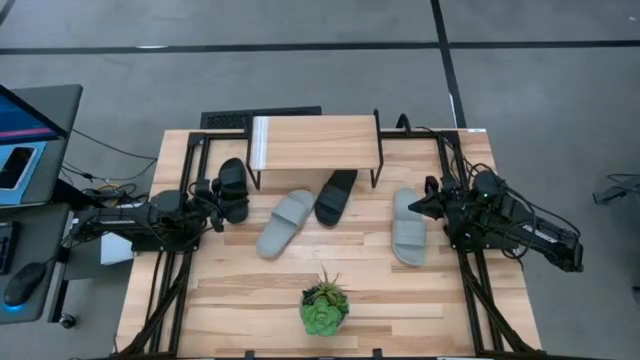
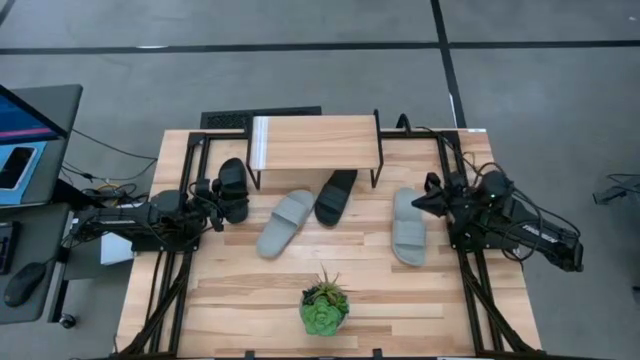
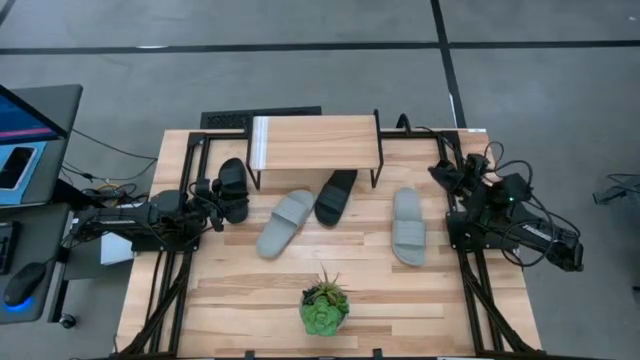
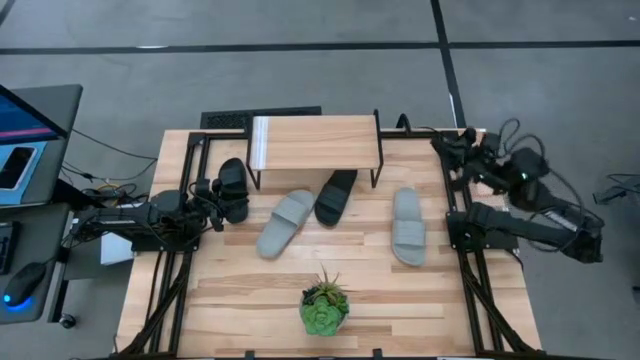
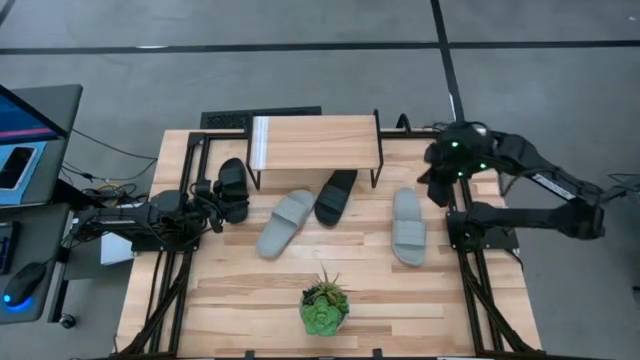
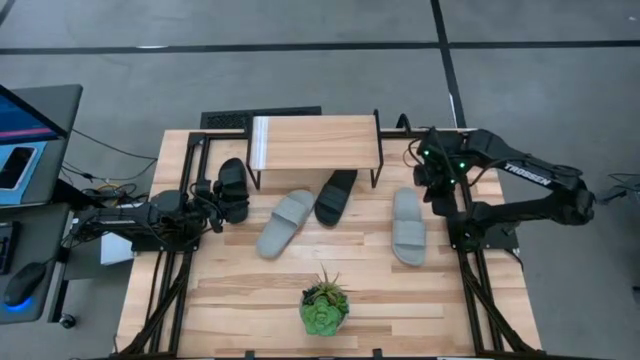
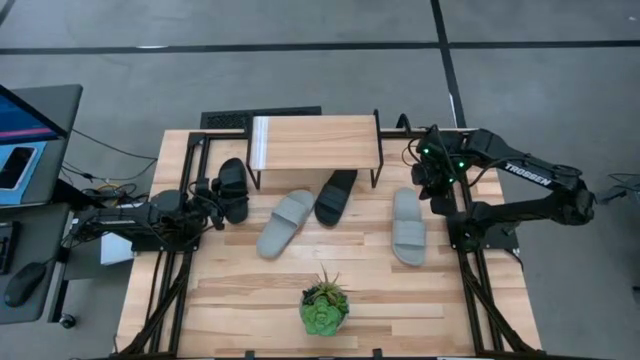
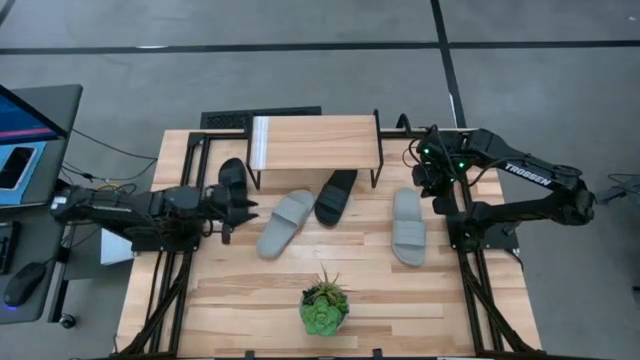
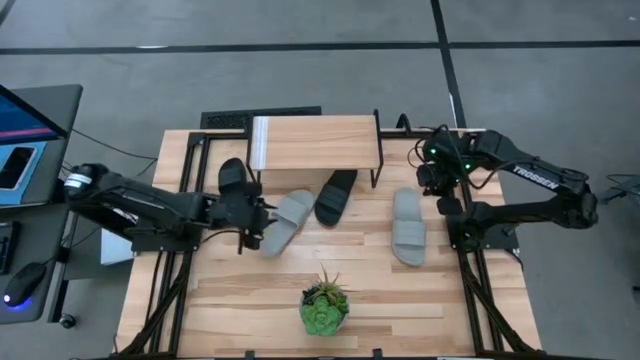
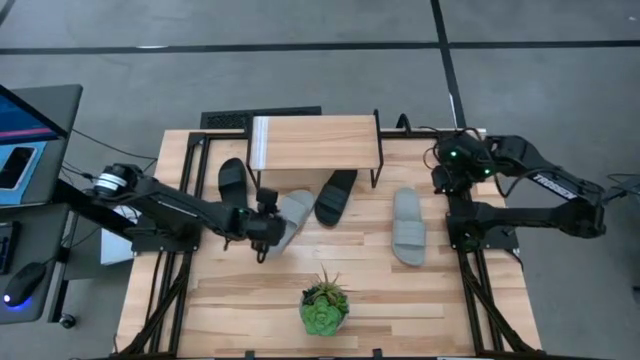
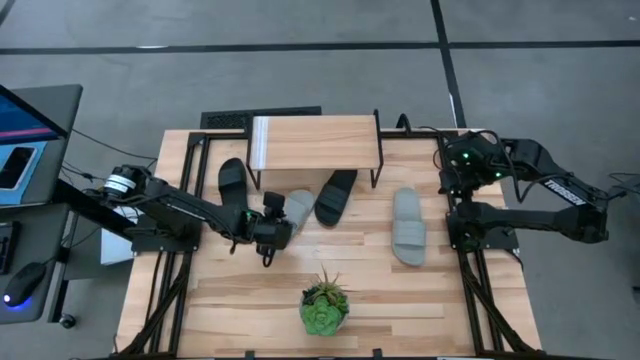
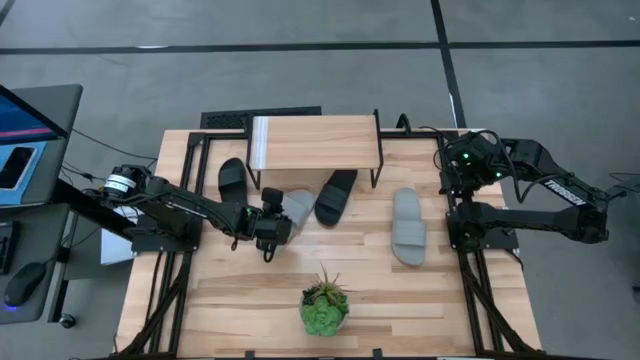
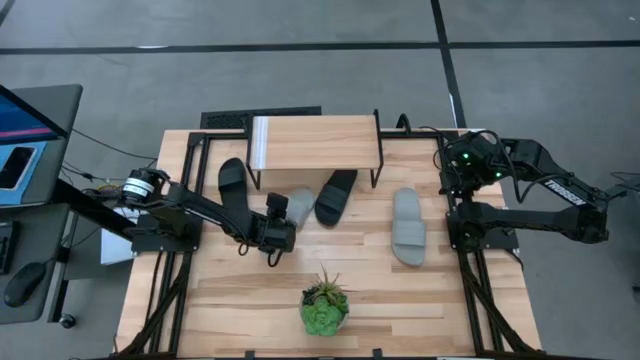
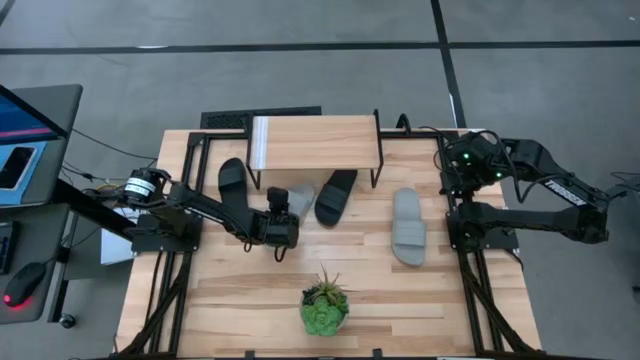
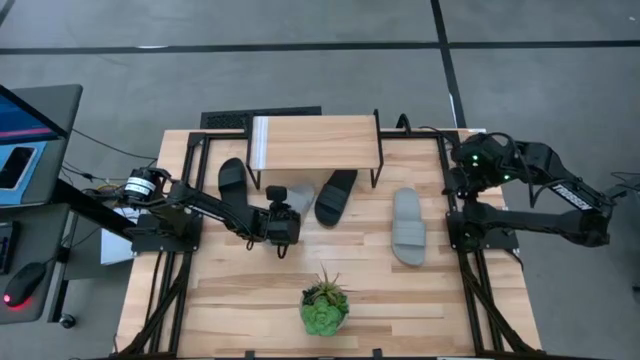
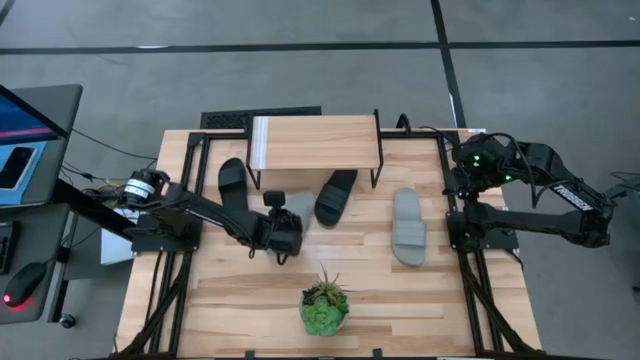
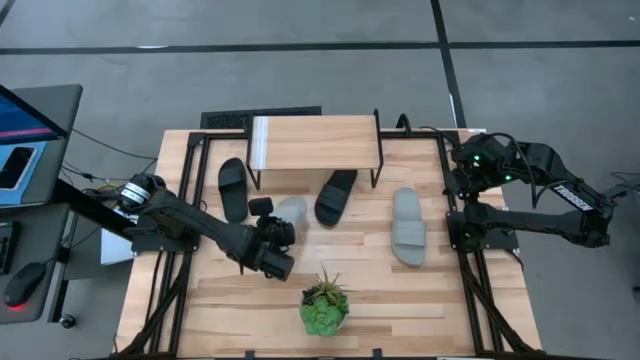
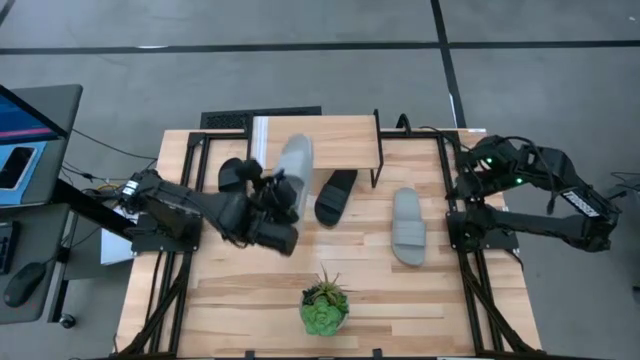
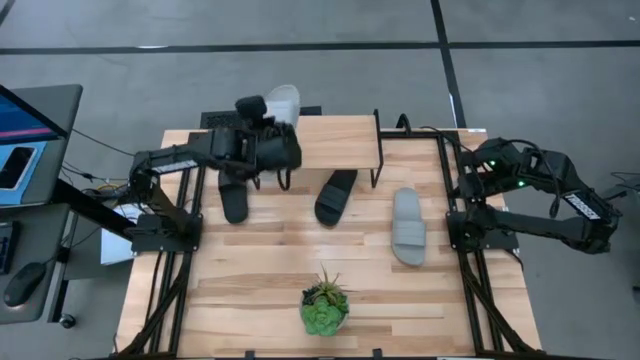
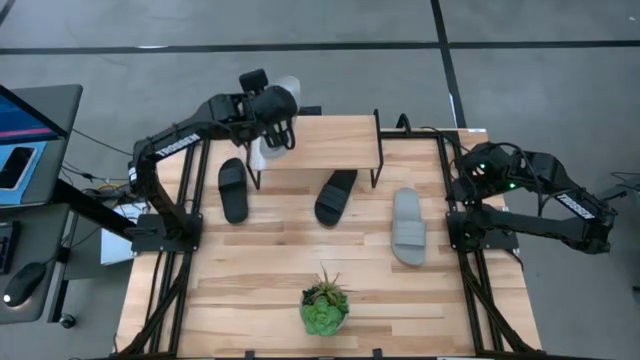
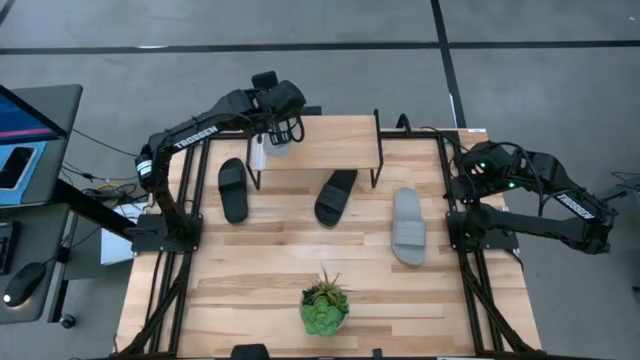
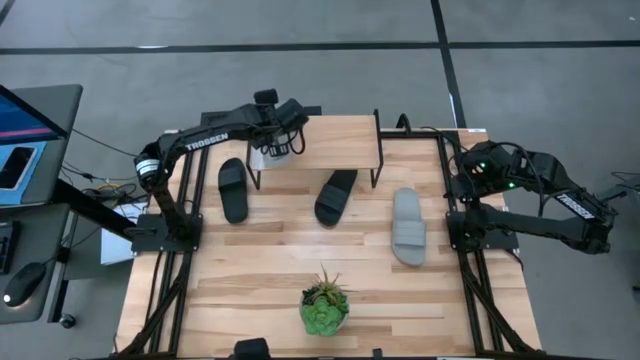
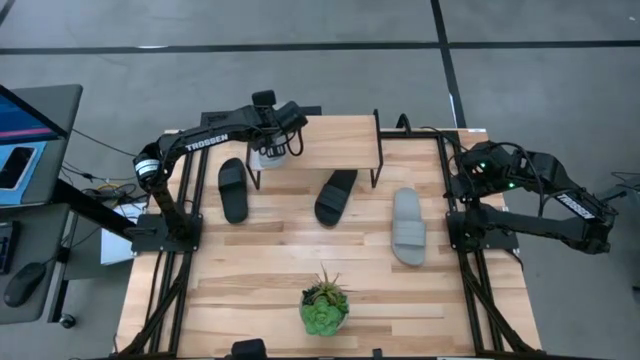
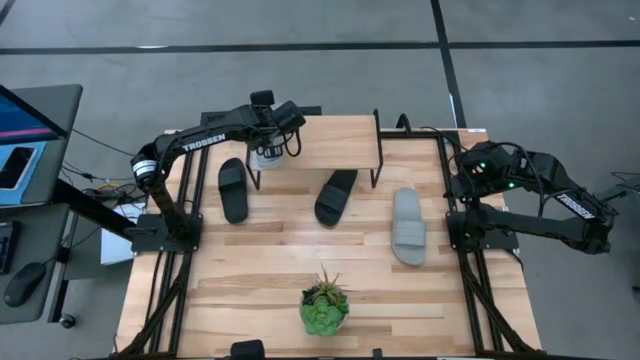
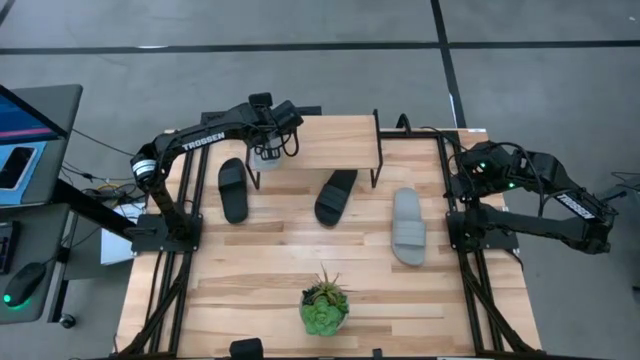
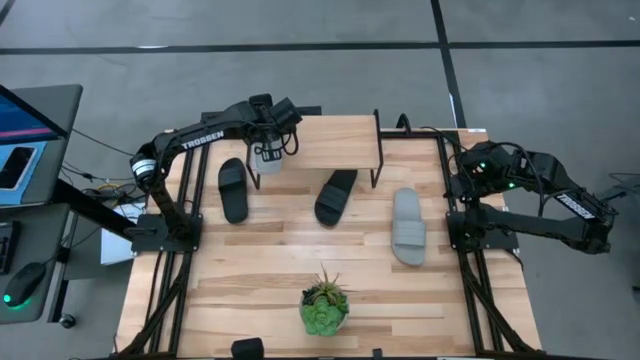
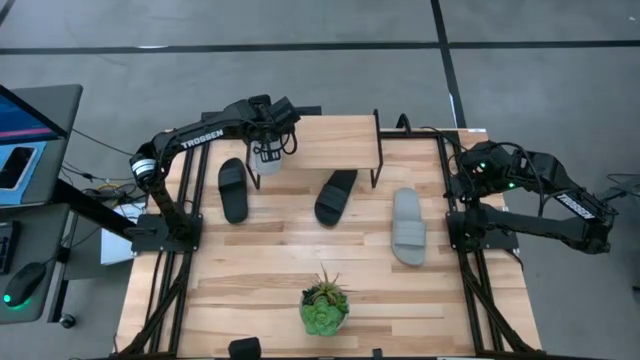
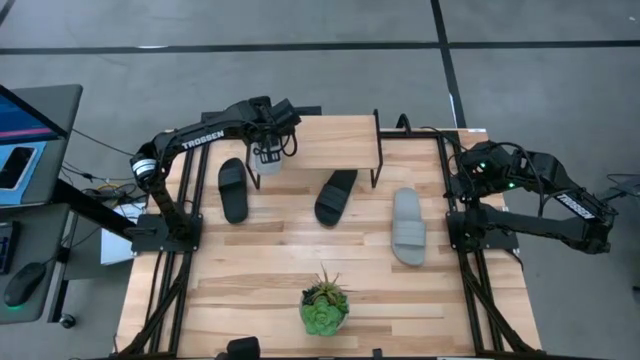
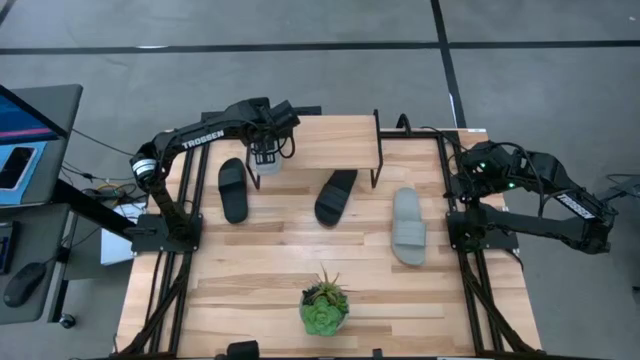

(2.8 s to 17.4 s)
Task: Pick and place slides into the shelf
Put the left gray slide on the shelf

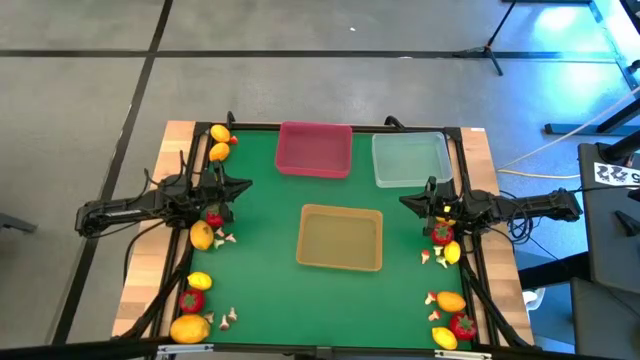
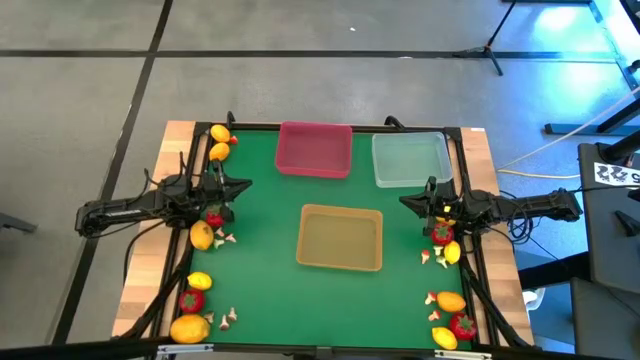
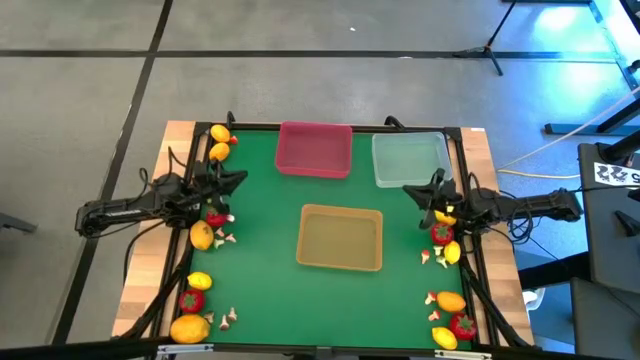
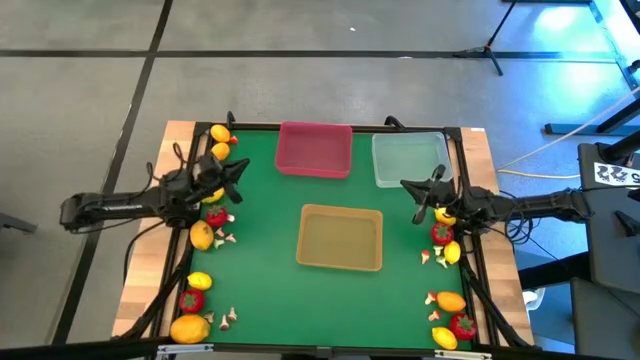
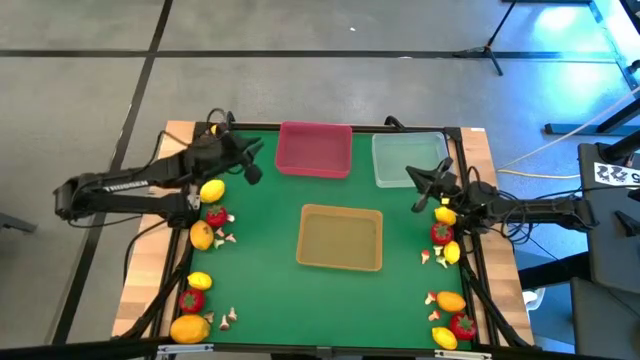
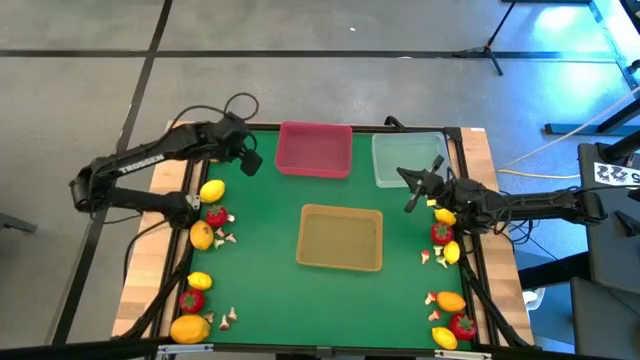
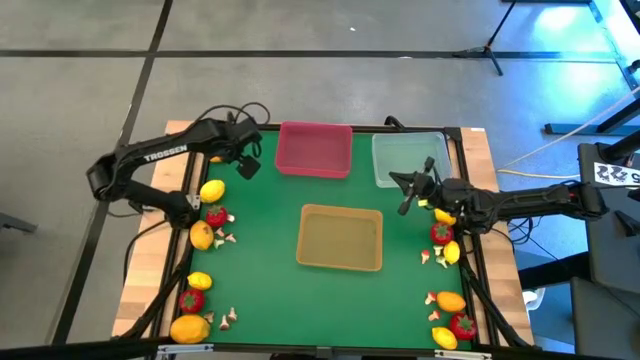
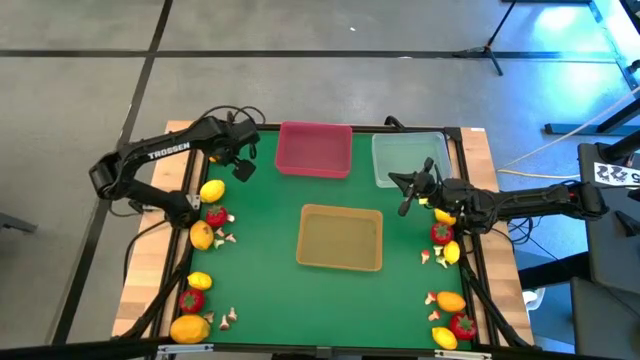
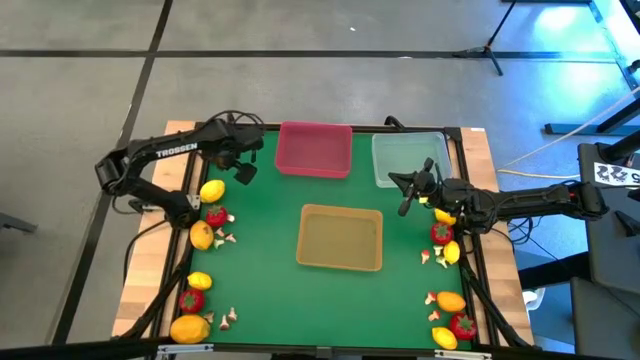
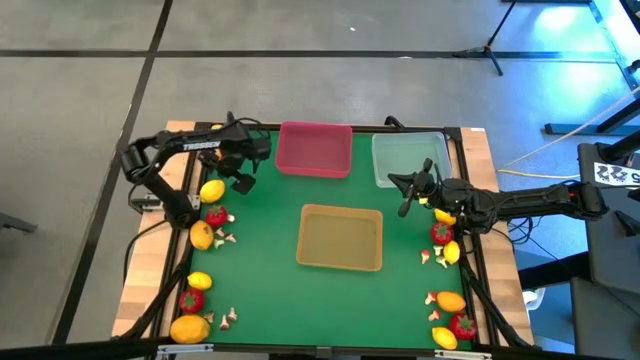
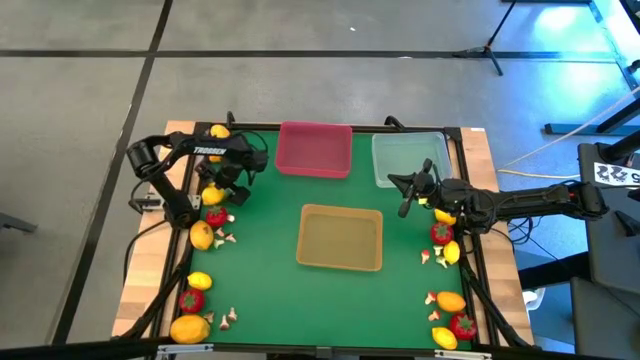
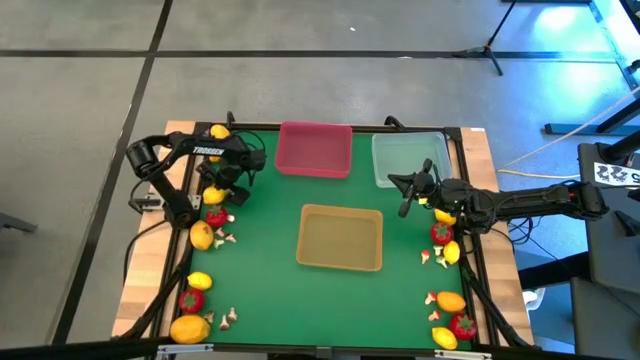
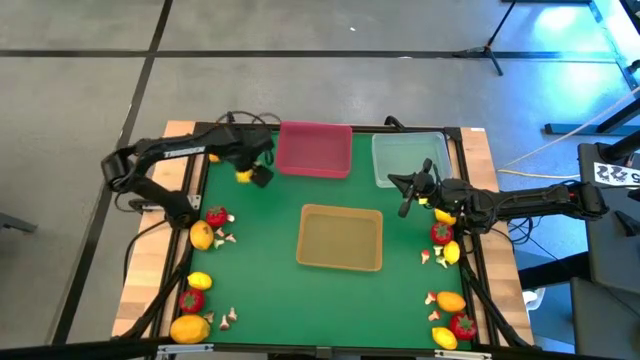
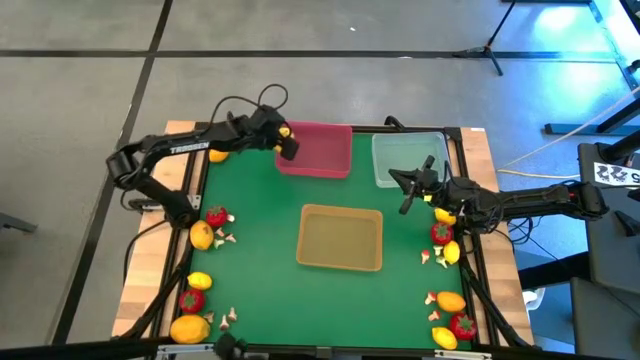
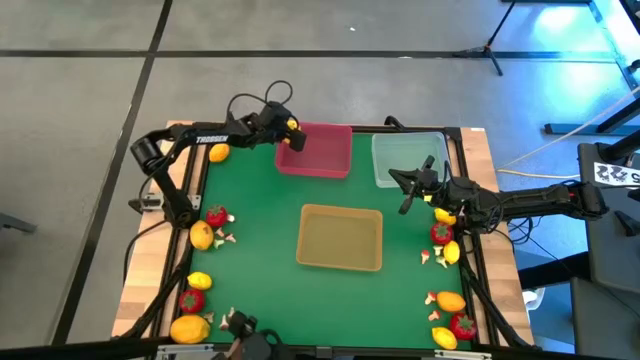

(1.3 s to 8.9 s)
Task: Sort produce into baskets
Put the yellow lemon into the red bin
